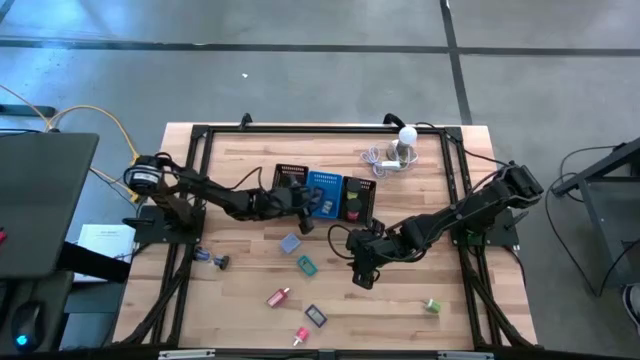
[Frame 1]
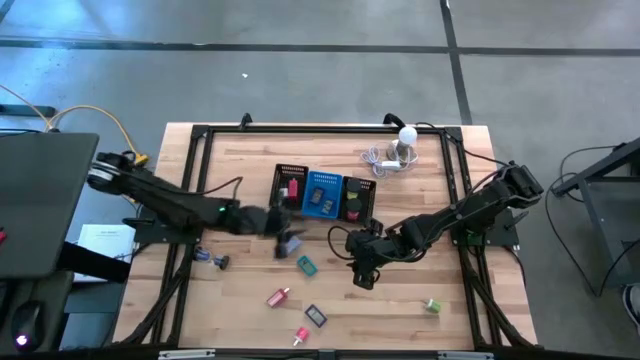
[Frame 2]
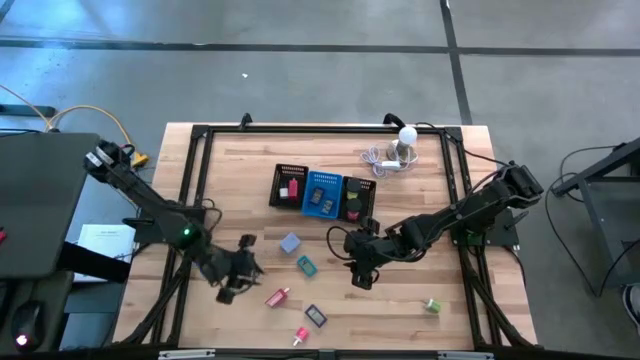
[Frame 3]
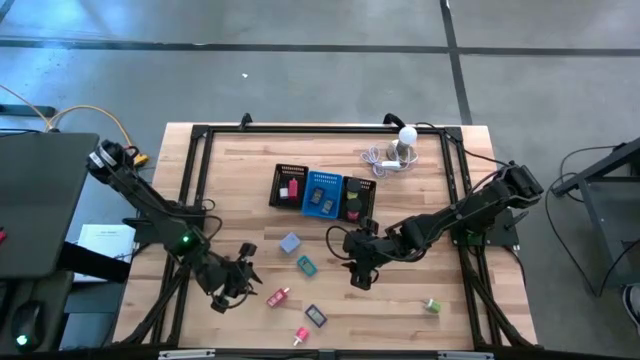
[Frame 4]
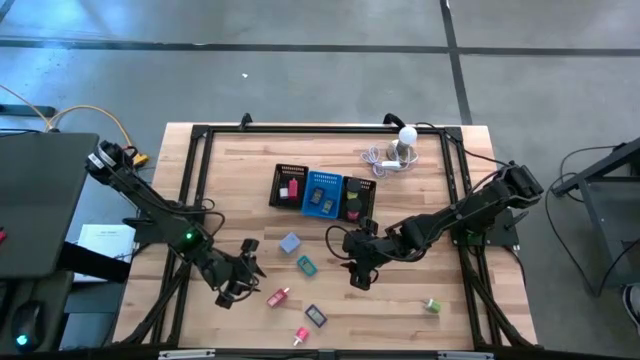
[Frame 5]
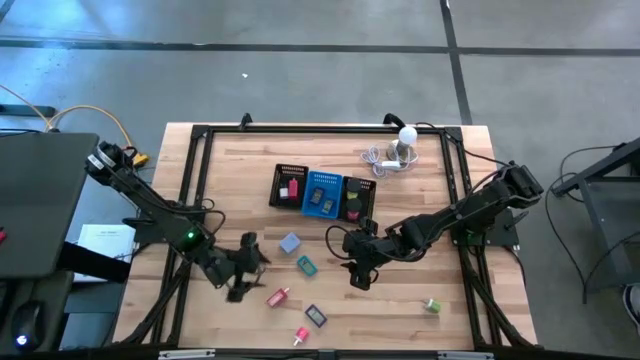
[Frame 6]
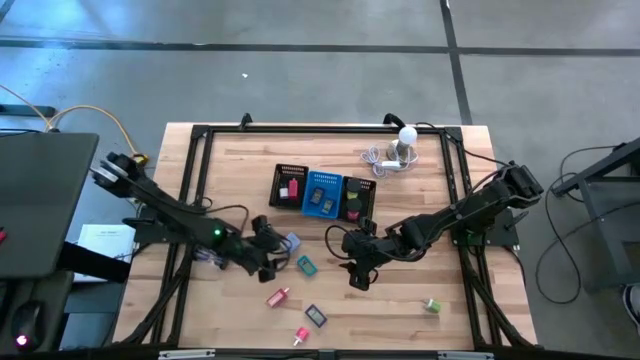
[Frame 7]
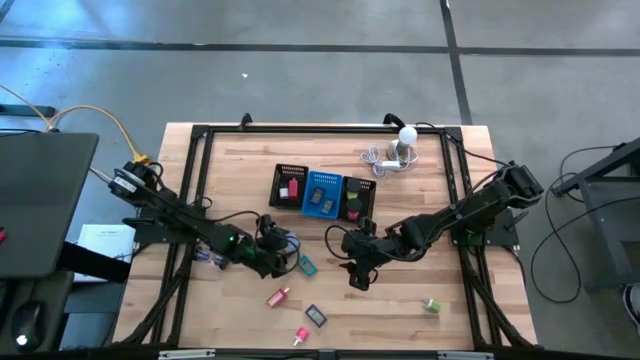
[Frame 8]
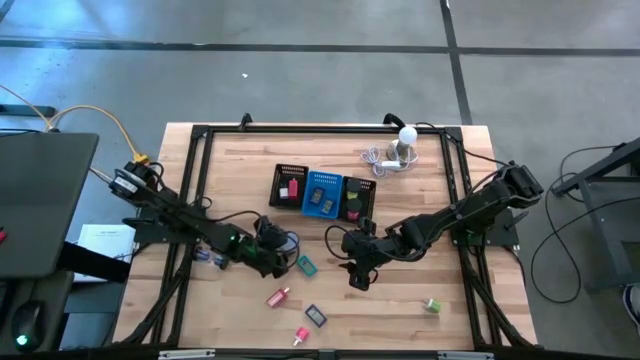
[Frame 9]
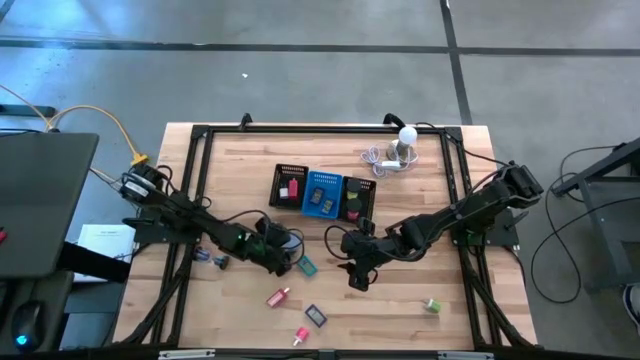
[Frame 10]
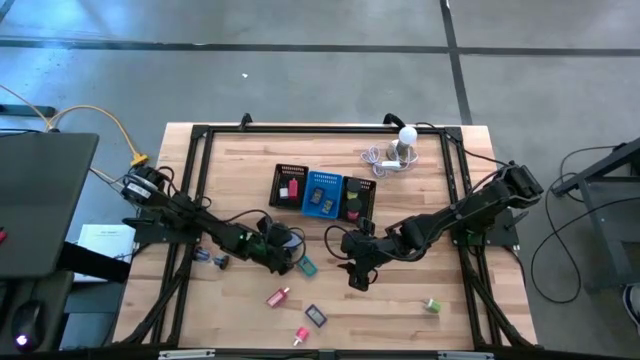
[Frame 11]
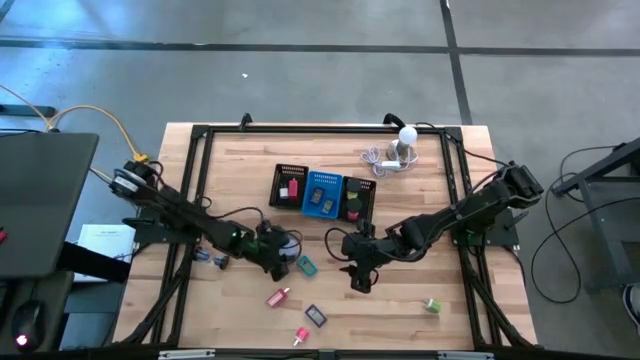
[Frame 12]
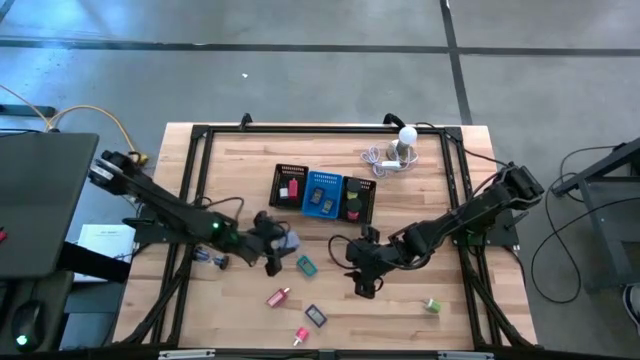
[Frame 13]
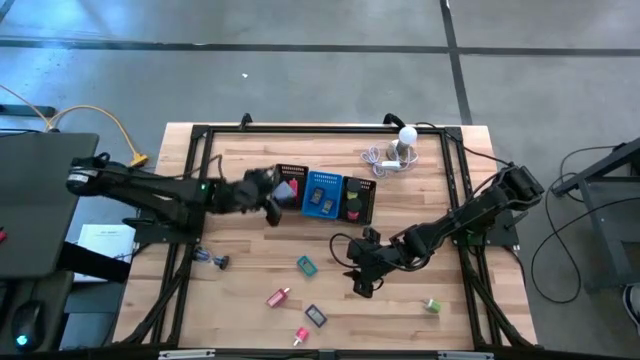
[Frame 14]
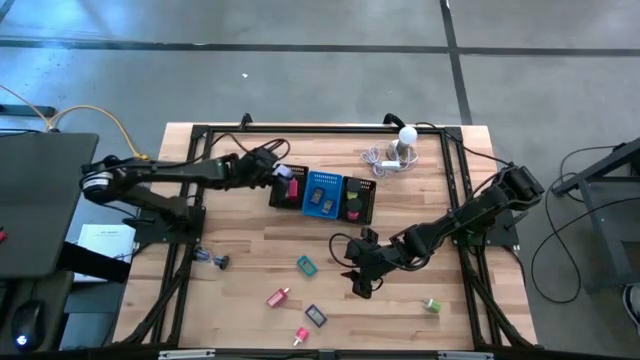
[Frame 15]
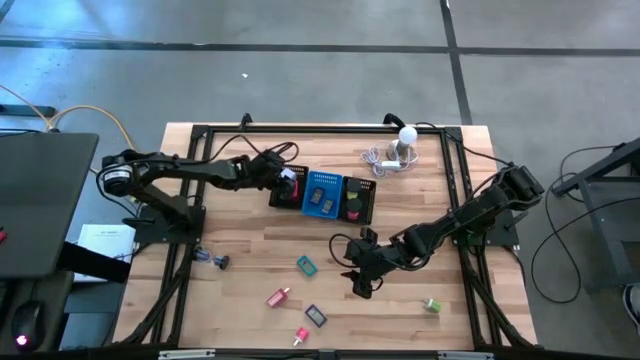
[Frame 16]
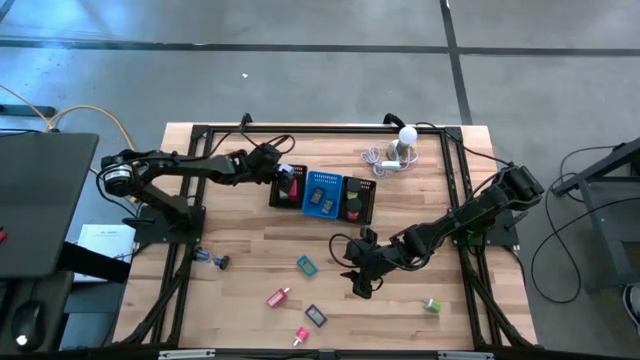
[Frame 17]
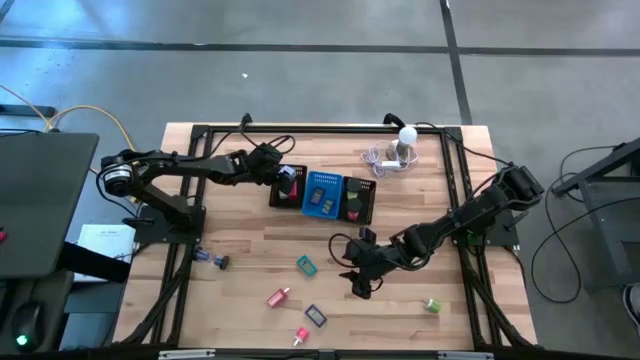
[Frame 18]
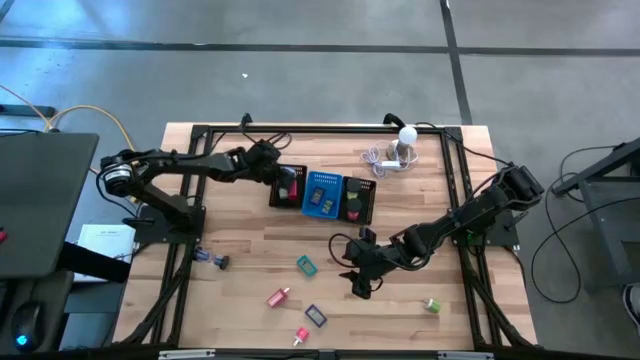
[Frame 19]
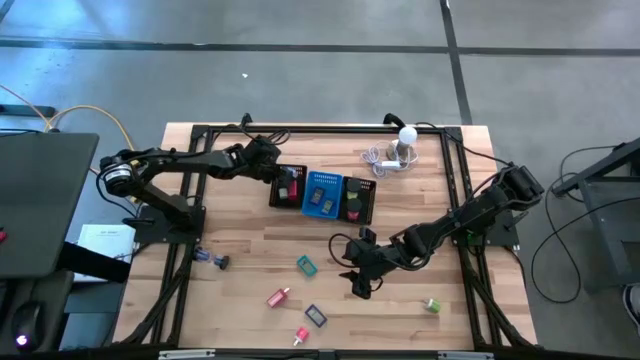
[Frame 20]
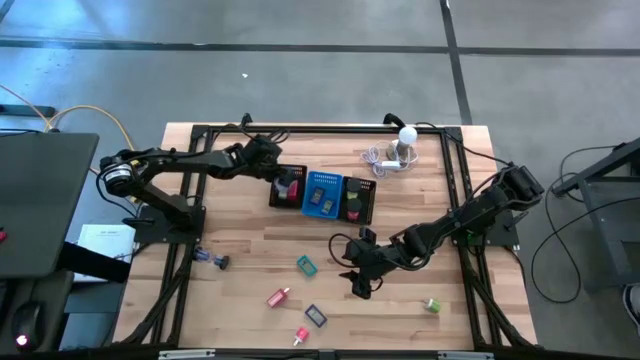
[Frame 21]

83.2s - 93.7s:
Task: Pick & Place Office items
Put the light blue charger adapter into the left black bin

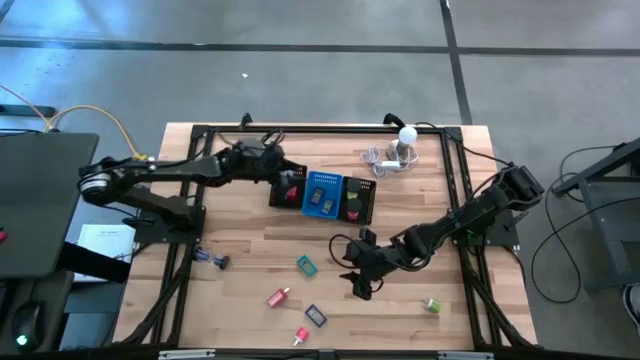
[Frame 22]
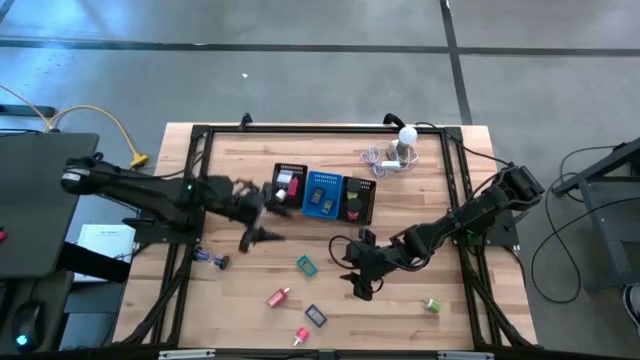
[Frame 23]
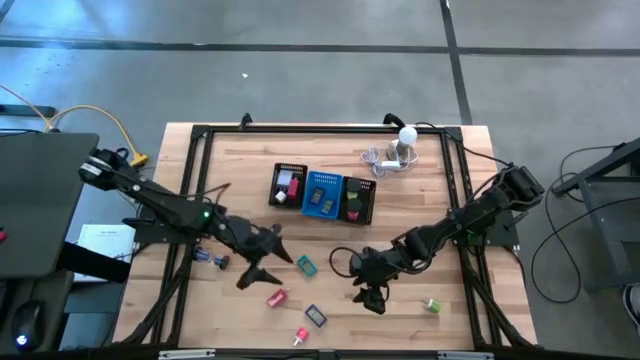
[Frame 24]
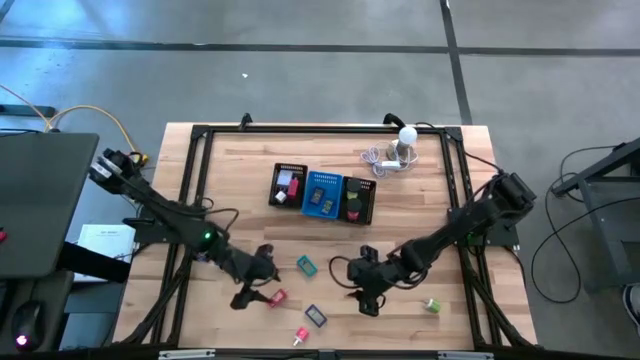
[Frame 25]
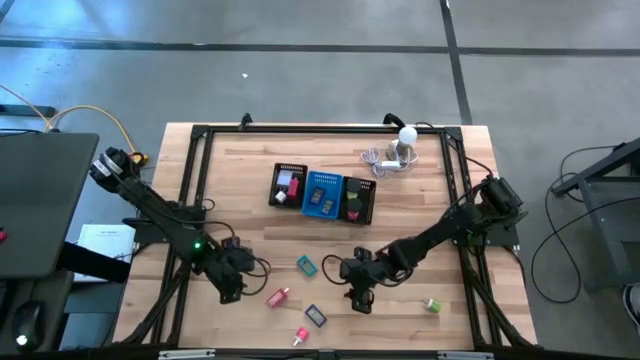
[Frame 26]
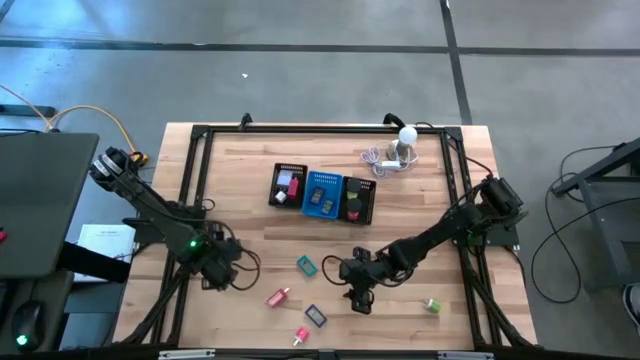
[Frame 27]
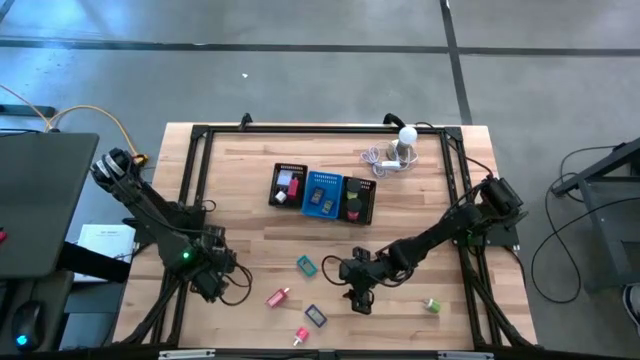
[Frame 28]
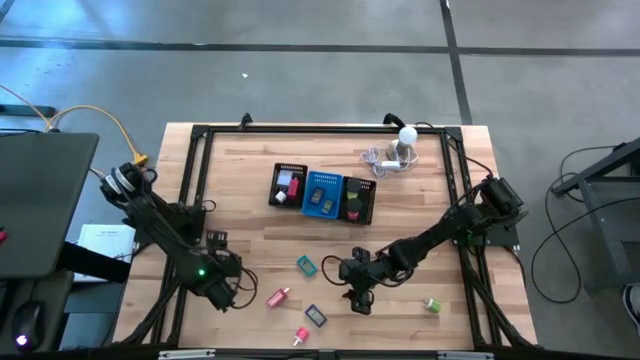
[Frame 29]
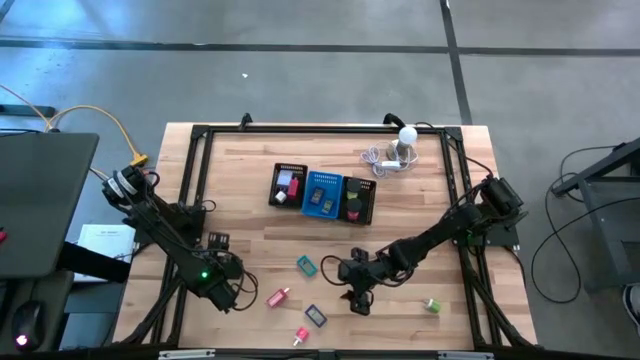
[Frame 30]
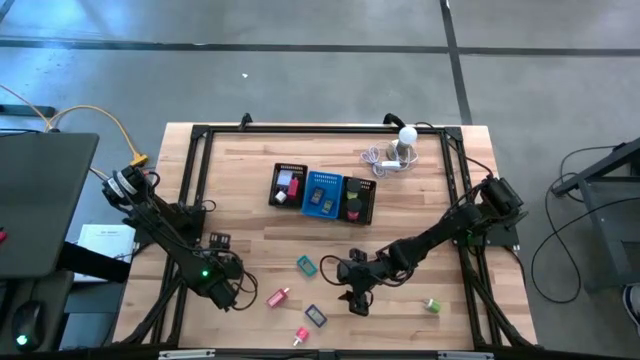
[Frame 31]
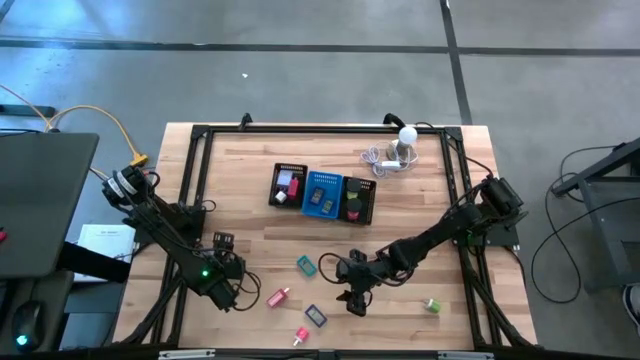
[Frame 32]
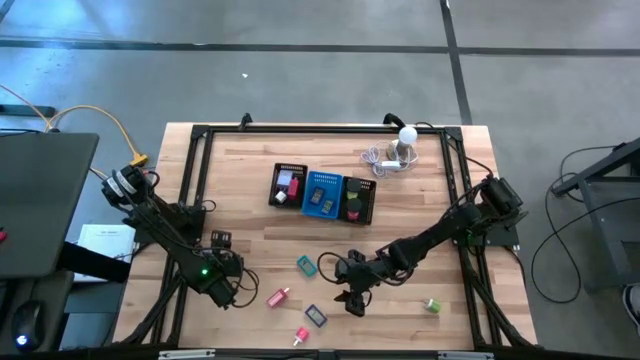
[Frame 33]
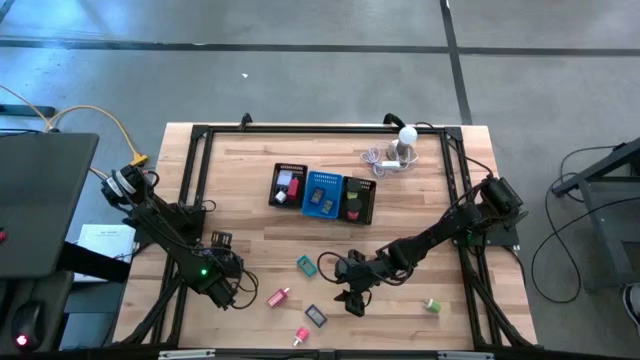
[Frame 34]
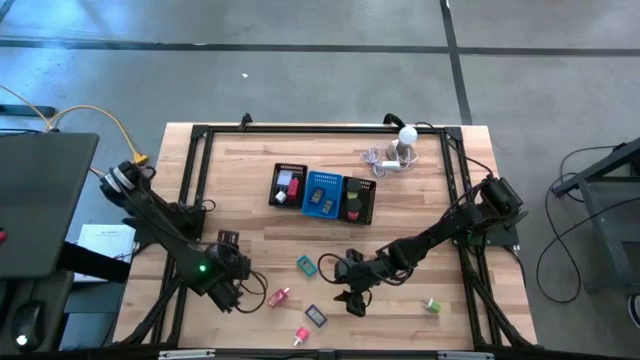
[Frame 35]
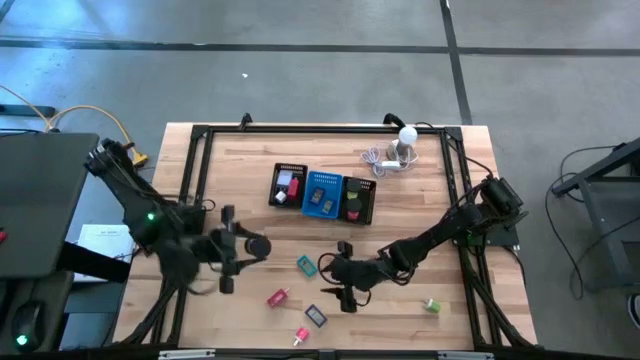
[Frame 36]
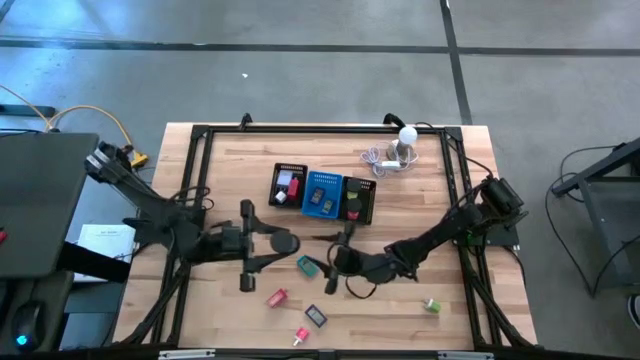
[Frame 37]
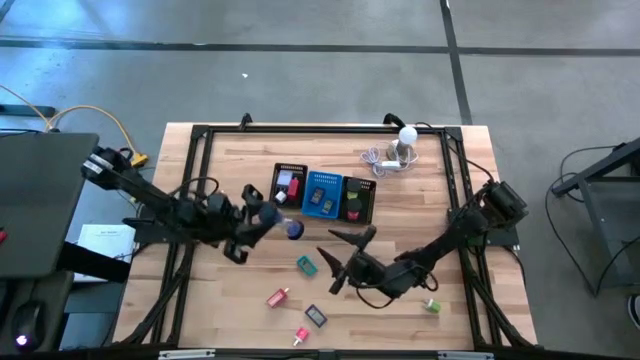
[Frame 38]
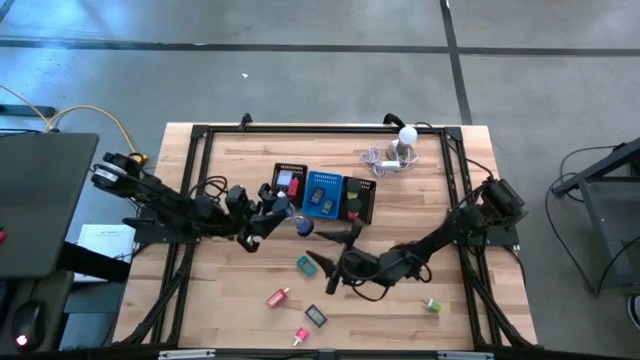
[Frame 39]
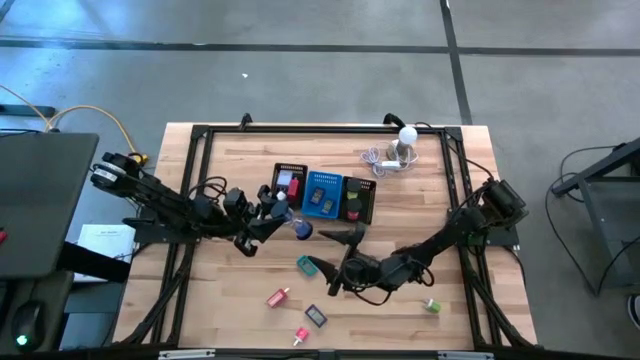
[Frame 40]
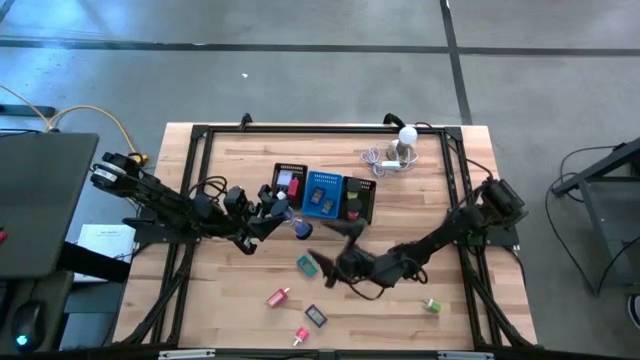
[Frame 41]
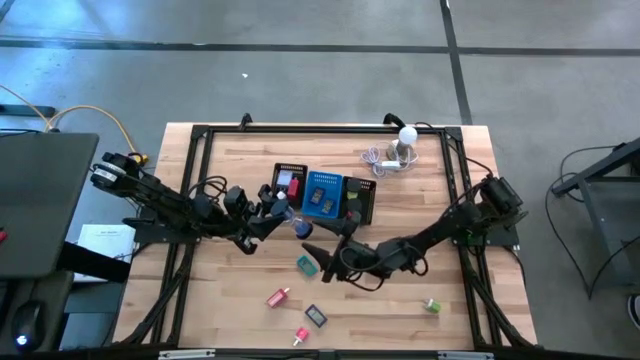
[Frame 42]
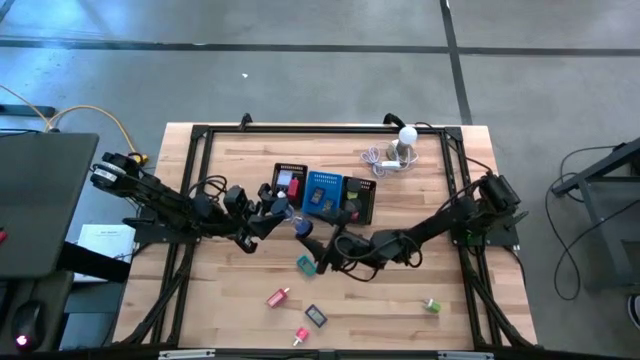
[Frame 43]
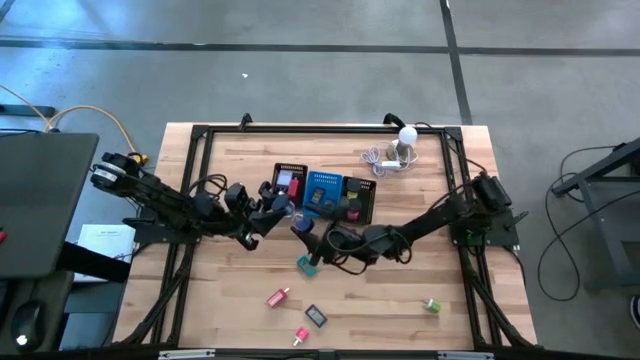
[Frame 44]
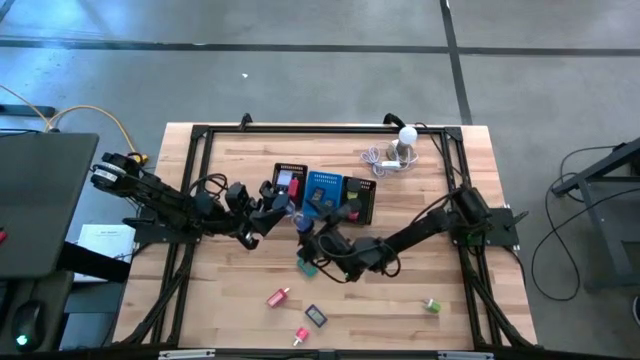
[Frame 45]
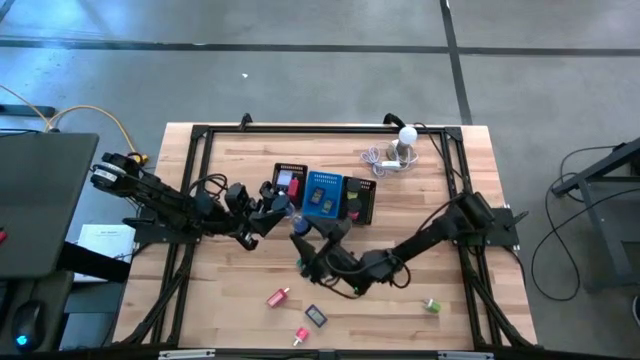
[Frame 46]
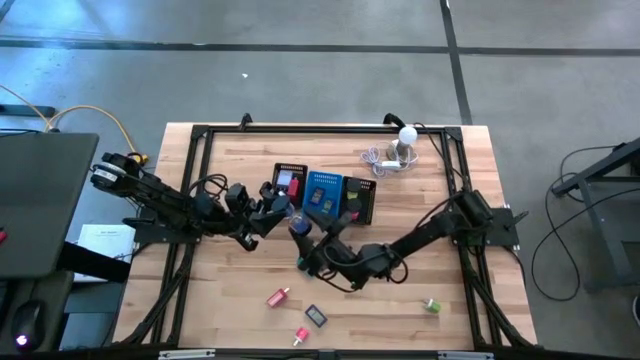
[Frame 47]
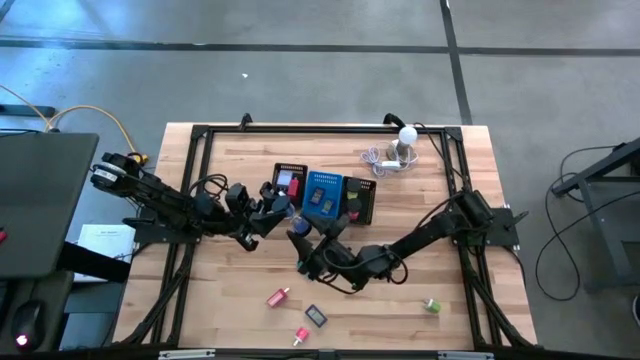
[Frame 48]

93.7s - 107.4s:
Put the blue hour glass into the right black bin
